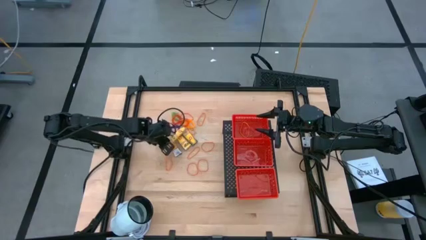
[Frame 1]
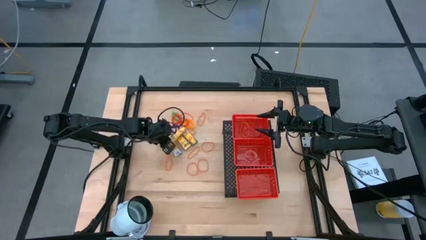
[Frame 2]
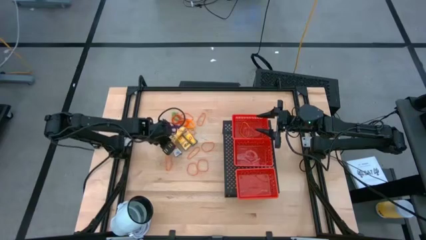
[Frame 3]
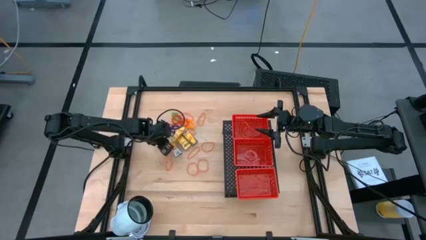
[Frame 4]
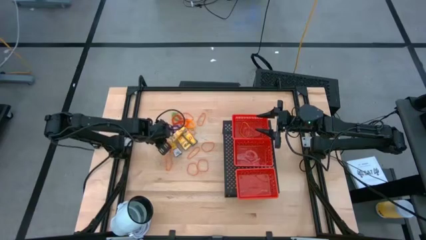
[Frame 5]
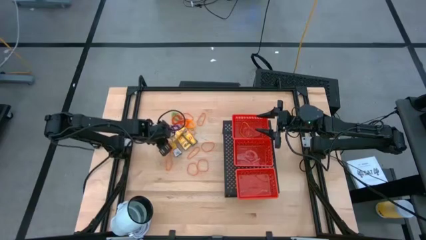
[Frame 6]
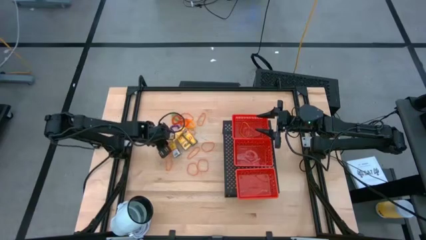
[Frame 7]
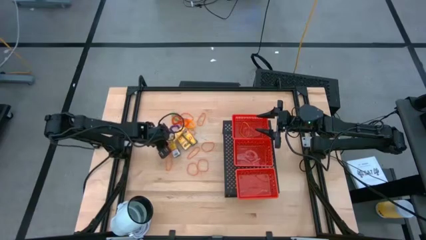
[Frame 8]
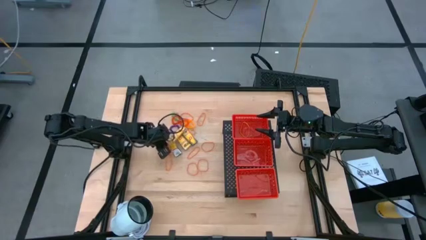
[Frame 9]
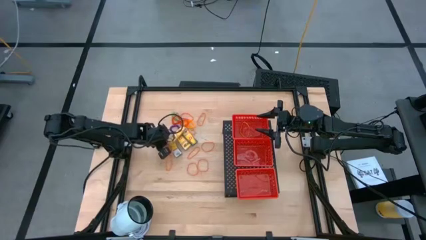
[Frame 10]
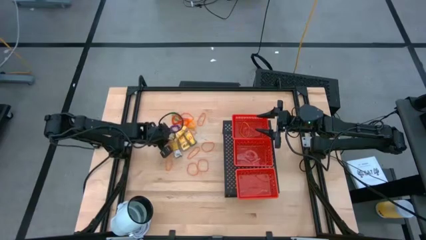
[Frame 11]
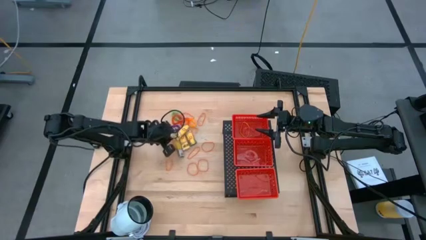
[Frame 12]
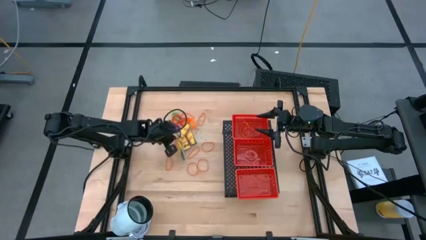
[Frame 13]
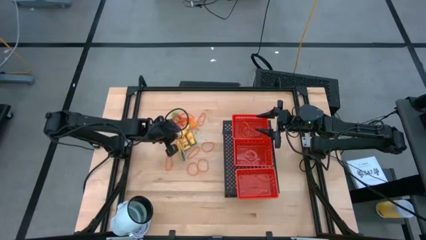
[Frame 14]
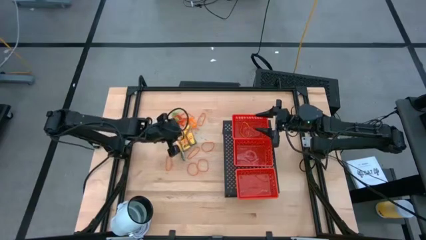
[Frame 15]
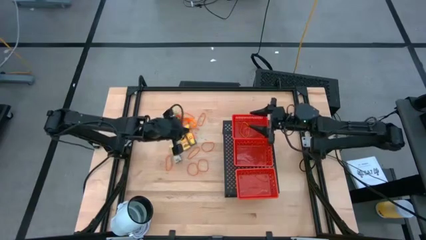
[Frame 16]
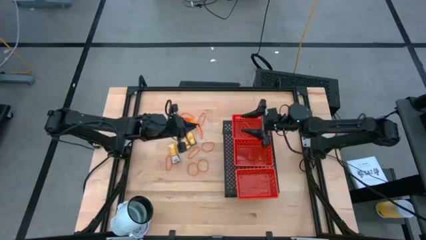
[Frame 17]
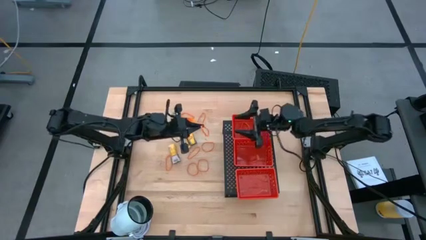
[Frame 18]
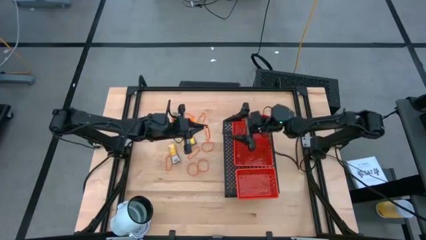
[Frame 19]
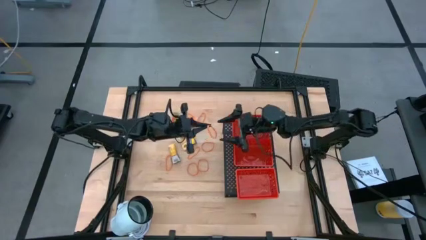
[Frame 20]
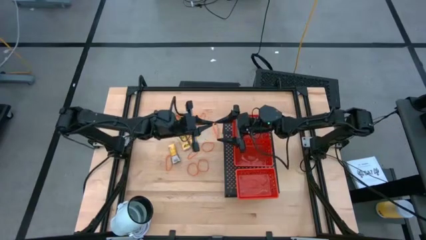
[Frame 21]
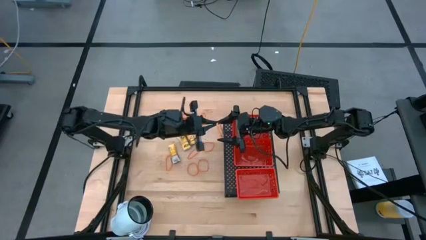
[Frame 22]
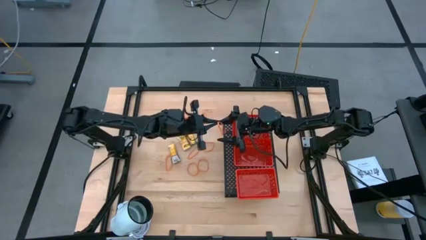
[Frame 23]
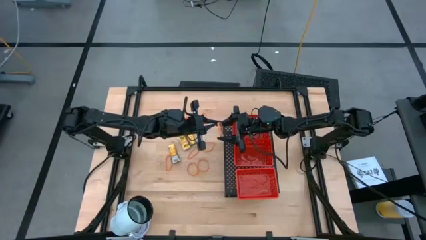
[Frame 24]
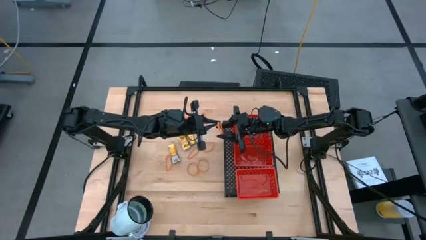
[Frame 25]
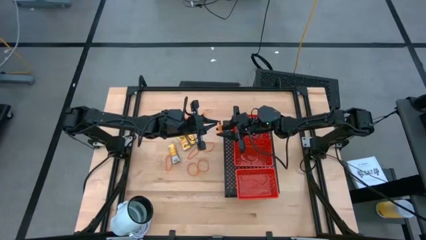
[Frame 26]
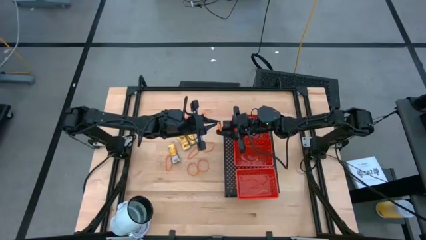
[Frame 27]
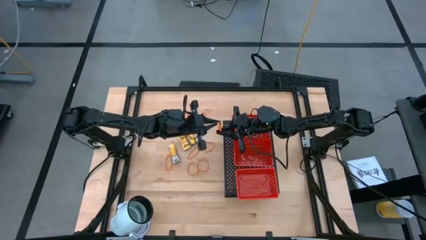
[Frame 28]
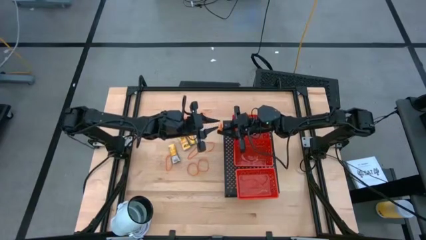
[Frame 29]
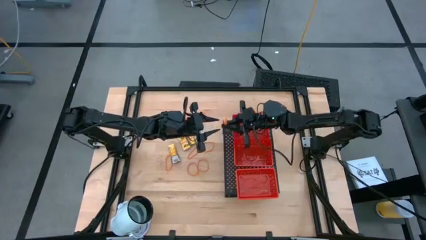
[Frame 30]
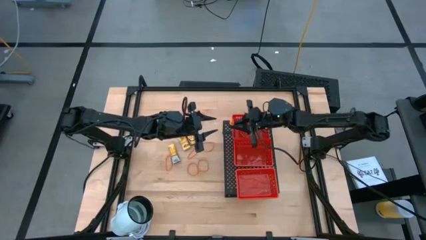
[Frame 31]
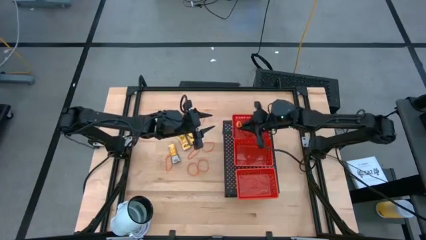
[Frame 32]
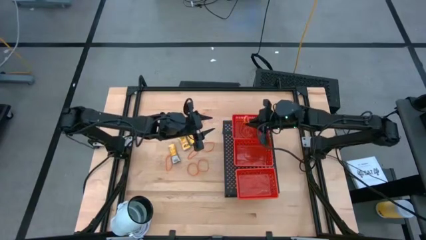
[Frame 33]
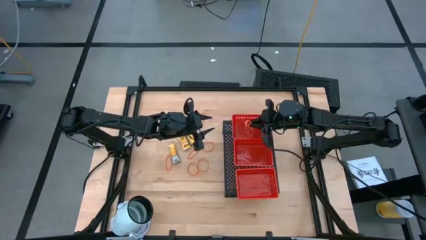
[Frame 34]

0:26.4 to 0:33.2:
Task: Pick & Place Office Desk Supplies
Put the orange rubber band into the top red bin on the shelf

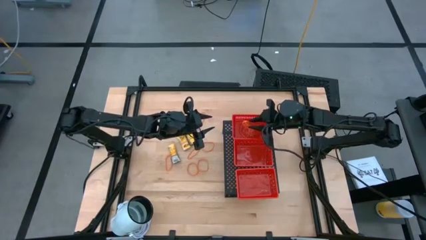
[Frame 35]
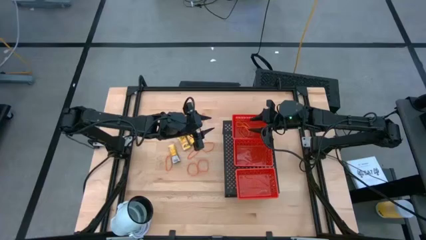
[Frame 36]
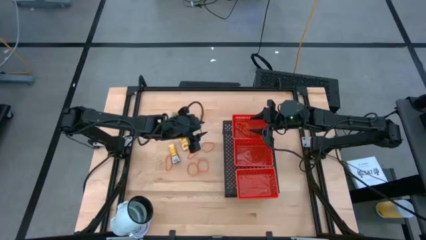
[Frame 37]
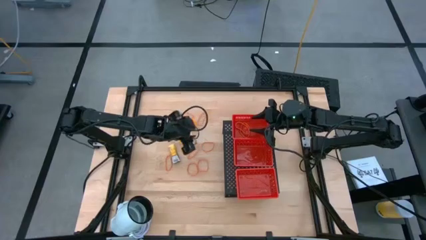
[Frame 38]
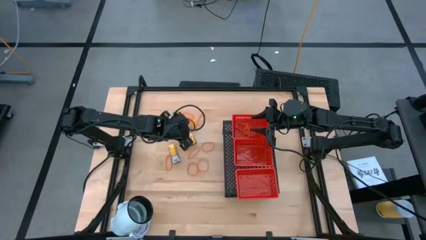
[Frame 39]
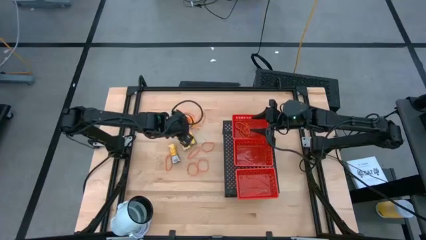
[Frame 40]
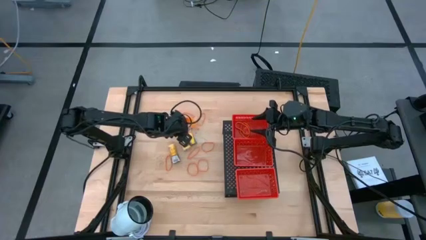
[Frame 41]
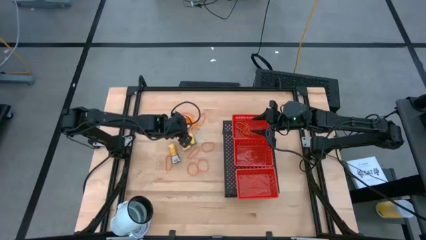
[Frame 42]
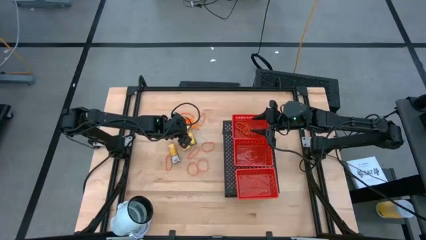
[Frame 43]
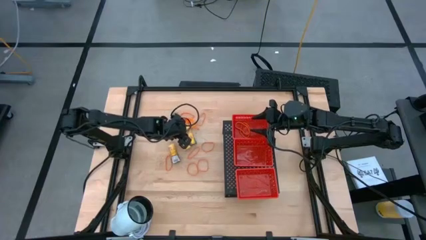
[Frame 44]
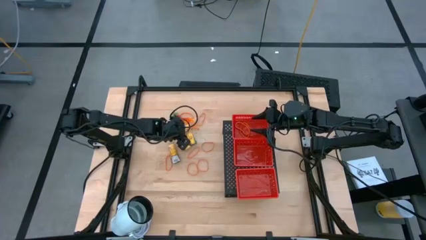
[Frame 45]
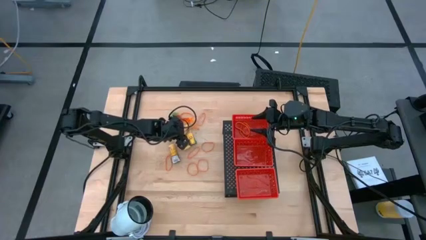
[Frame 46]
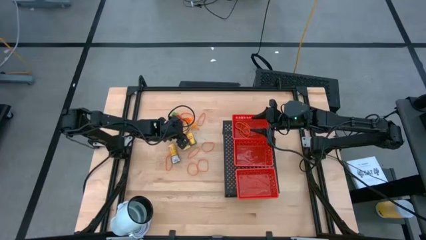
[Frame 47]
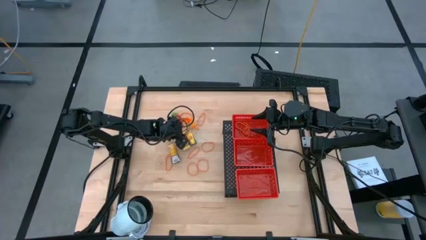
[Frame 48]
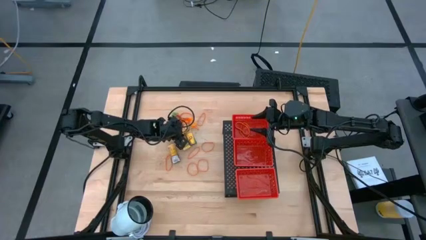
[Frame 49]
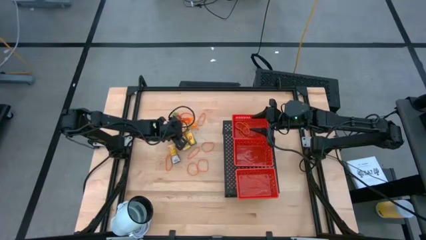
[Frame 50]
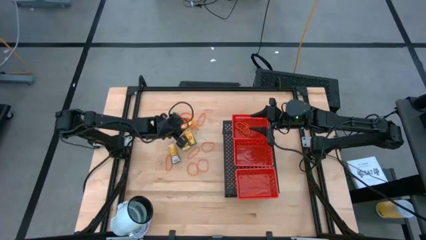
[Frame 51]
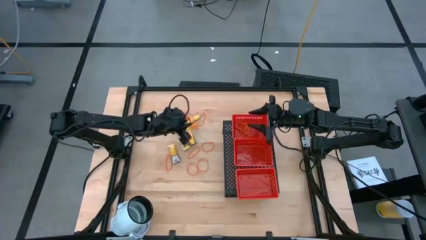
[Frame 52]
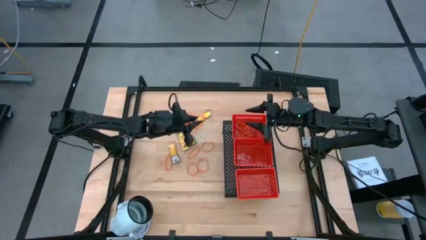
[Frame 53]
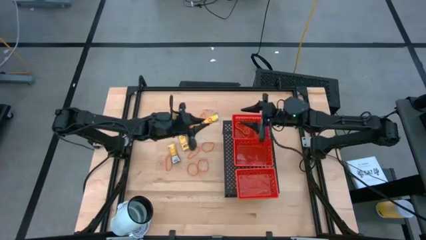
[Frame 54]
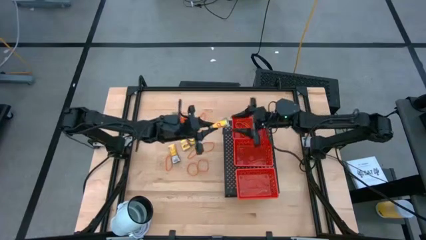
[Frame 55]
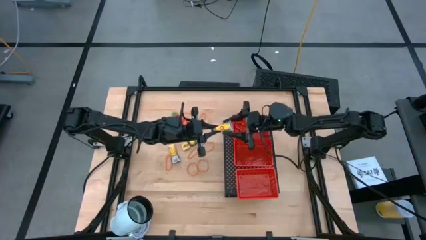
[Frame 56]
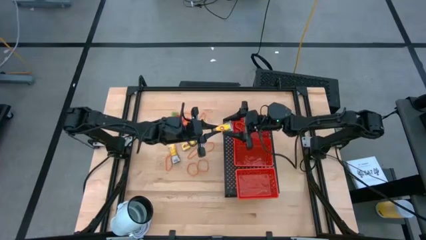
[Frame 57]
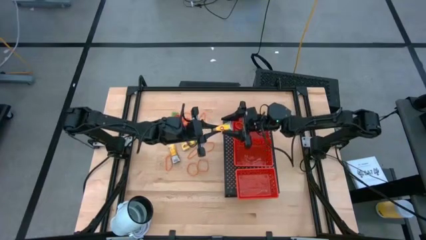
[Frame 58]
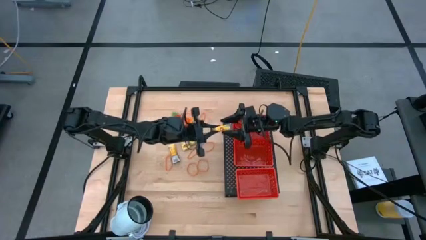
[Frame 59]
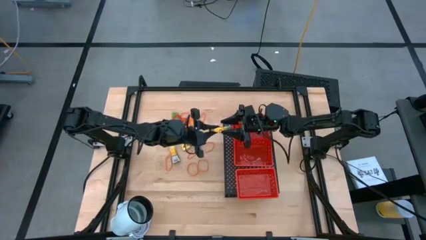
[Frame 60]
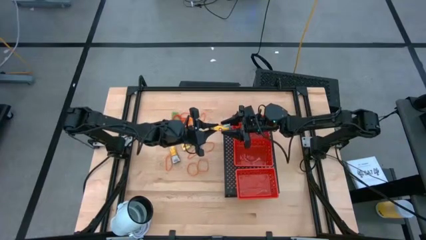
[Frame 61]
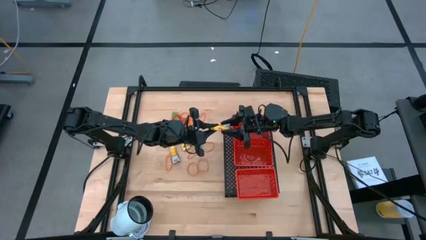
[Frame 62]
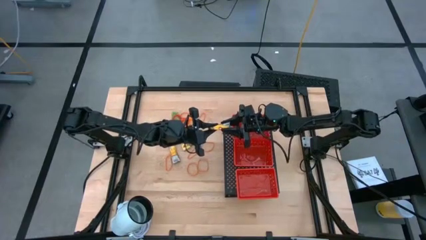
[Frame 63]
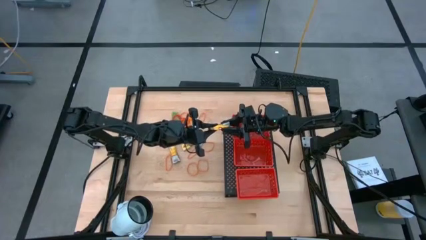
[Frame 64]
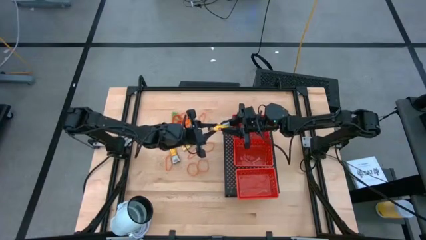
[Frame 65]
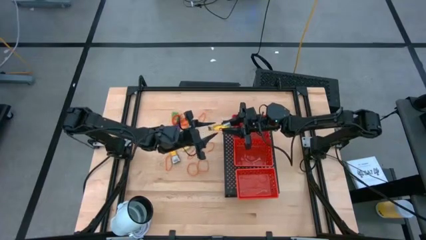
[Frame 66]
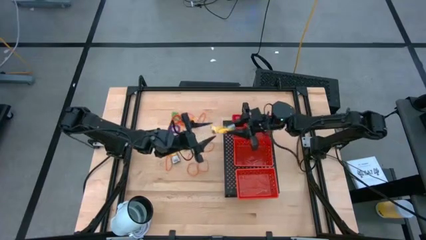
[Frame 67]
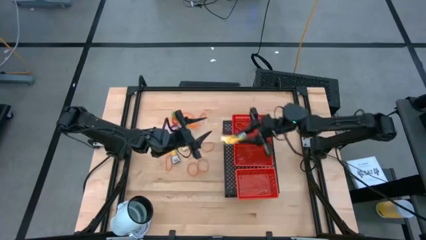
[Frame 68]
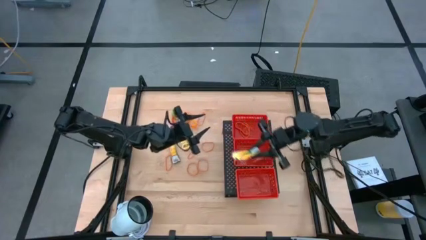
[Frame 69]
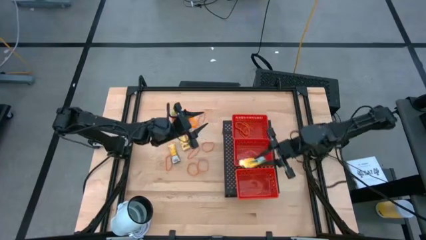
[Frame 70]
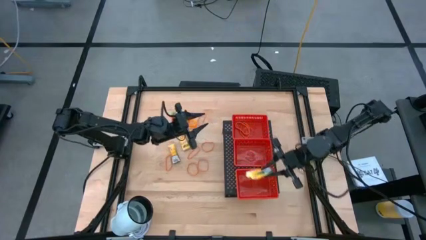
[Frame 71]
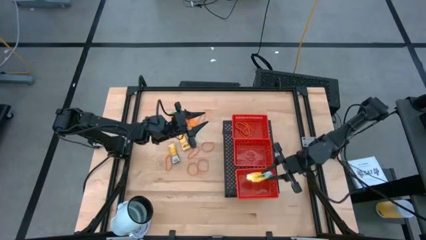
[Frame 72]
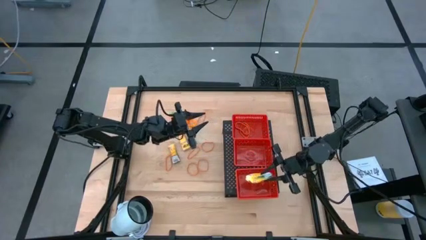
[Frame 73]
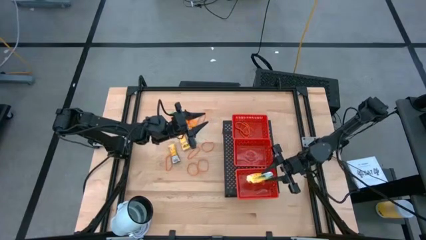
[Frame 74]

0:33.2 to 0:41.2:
Put the yellow pack of crayons into the bottom red bin on the shelf

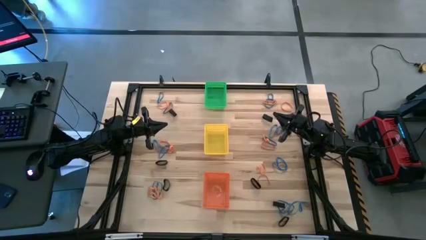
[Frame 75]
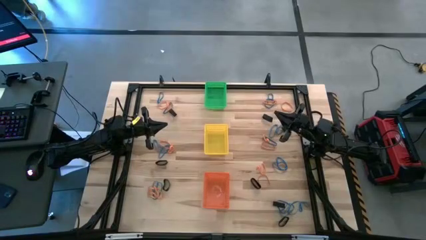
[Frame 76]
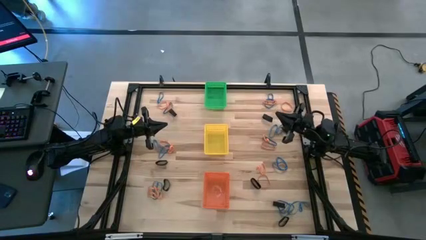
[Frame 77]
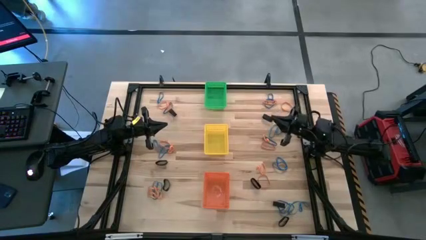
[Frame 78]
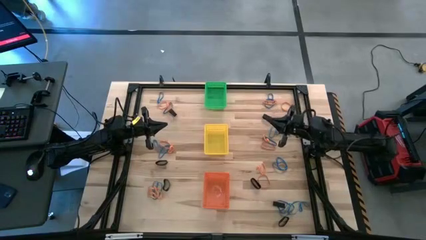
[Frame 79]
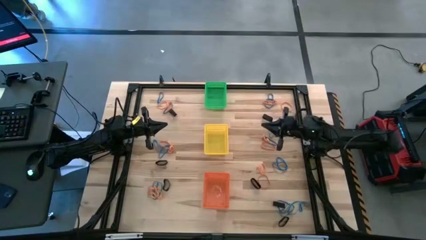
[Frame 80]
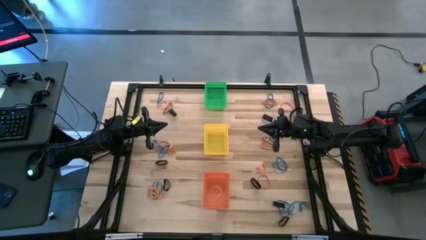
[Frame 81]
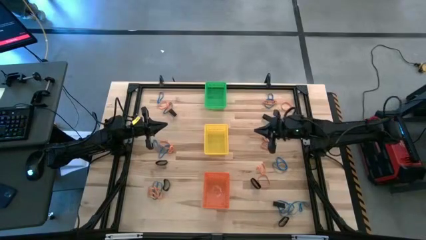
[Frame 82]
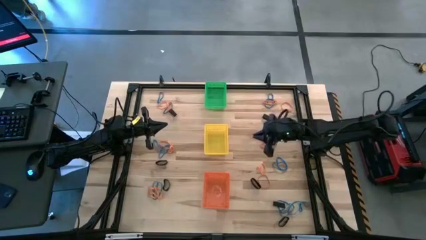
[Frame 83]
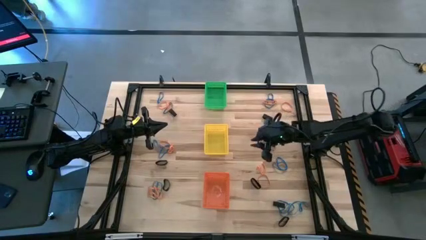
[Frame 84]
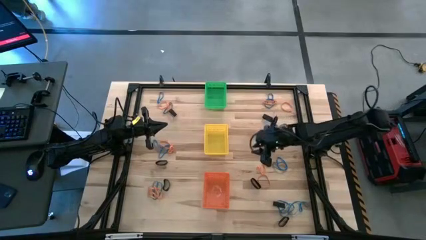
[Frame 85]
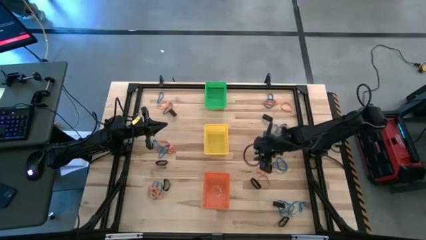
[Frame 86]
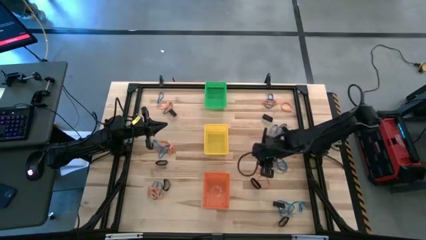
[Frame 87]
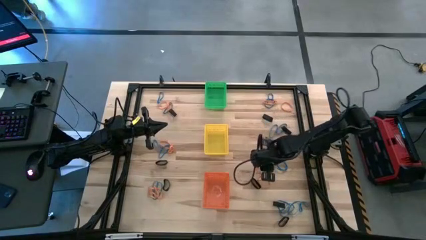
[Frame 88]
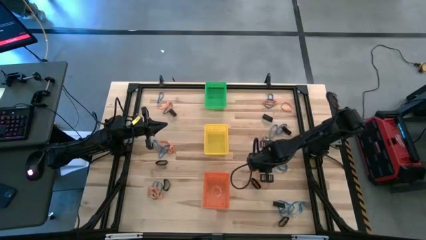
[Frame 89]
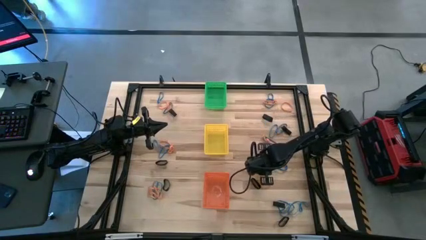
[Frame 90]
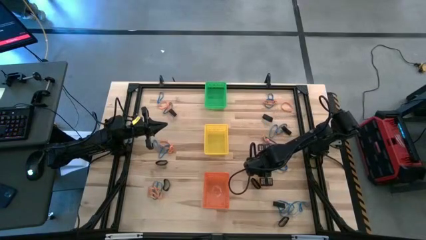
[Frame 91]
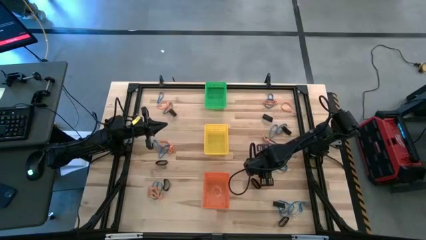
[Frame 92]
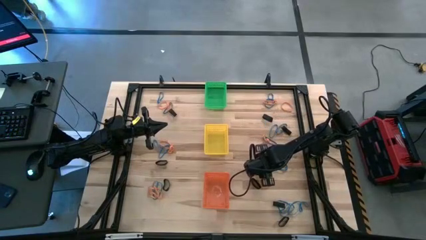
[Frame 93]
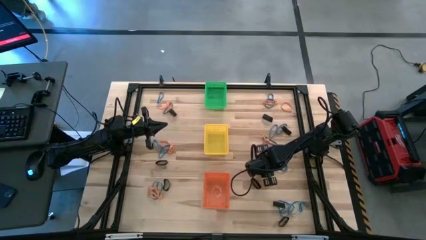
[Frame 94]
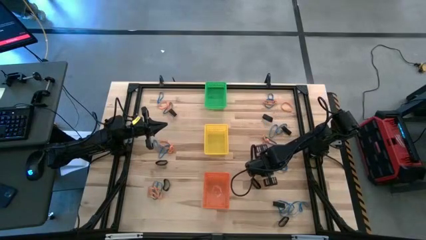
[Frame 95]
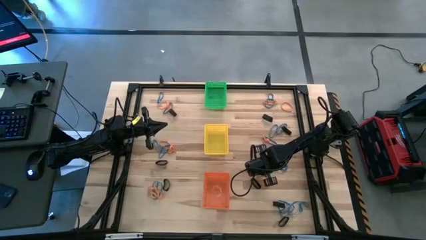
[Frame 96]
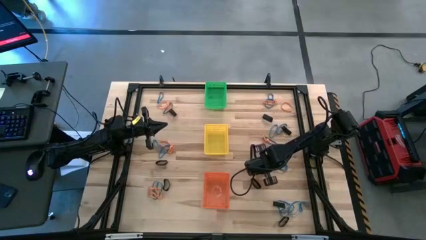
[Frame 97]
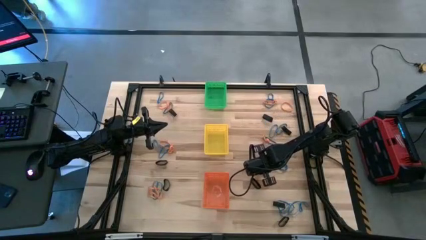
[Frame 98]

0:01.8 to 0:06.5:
Task: Sort rubber bands into baskets
Put the orange rubber band into the yellow bin
